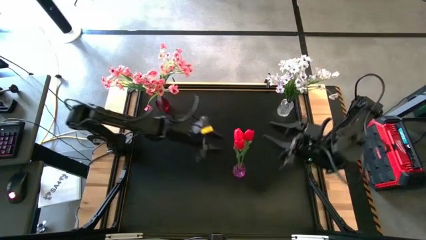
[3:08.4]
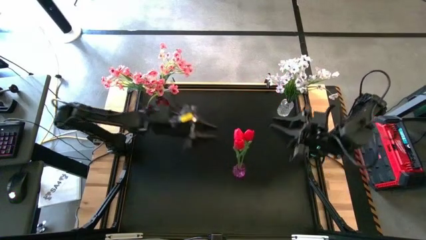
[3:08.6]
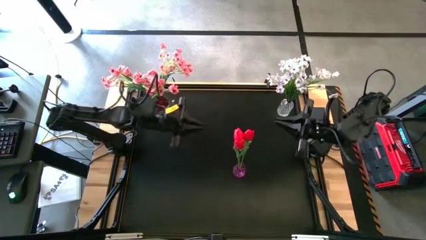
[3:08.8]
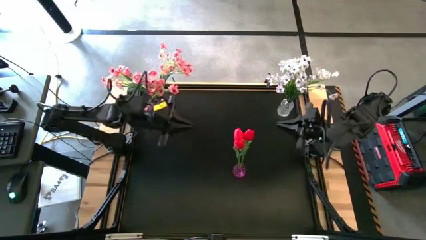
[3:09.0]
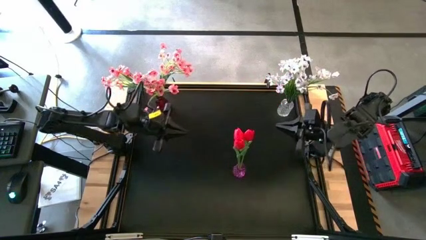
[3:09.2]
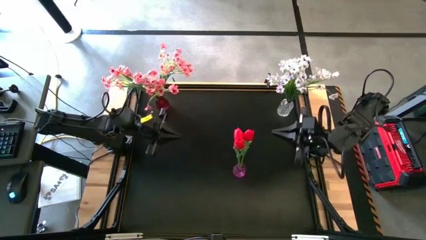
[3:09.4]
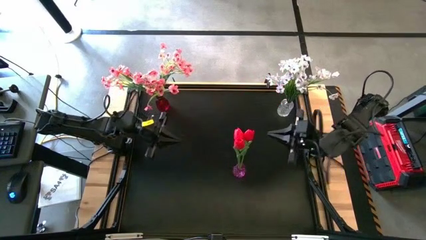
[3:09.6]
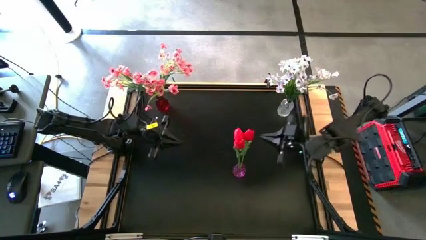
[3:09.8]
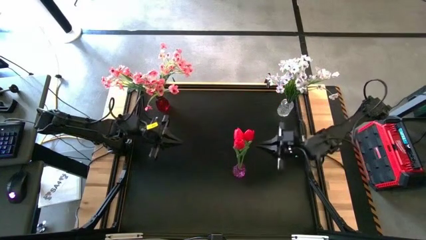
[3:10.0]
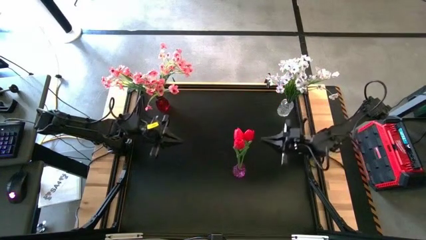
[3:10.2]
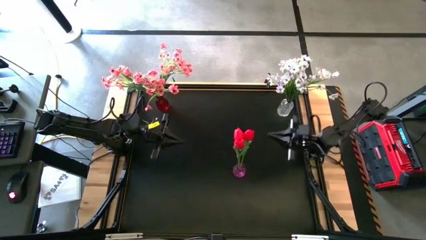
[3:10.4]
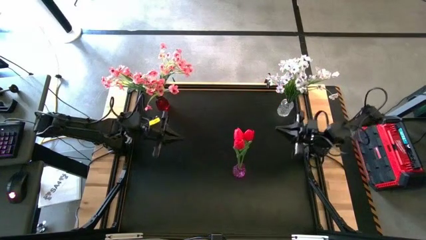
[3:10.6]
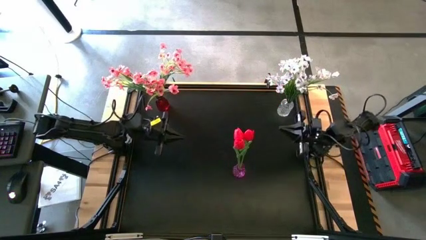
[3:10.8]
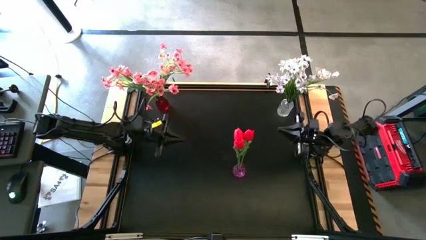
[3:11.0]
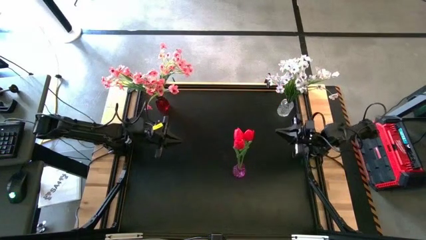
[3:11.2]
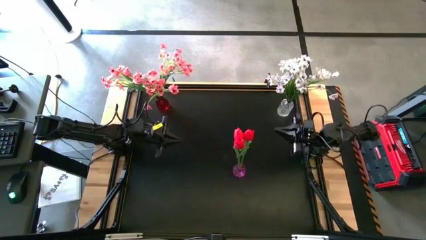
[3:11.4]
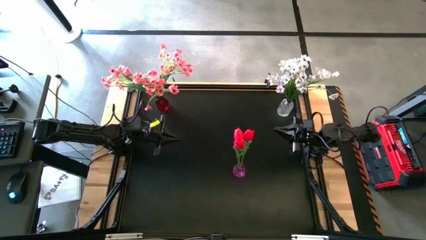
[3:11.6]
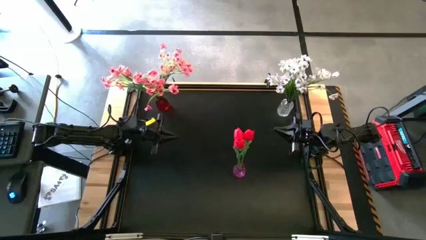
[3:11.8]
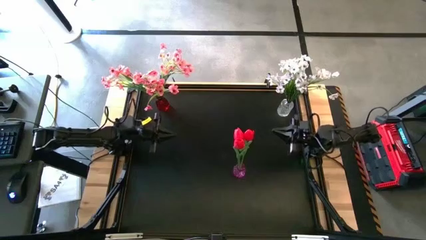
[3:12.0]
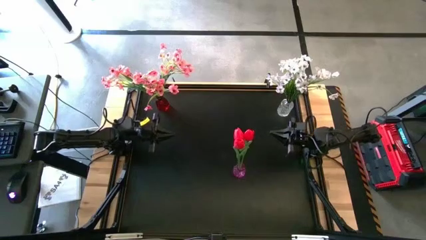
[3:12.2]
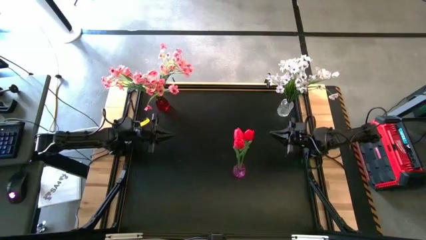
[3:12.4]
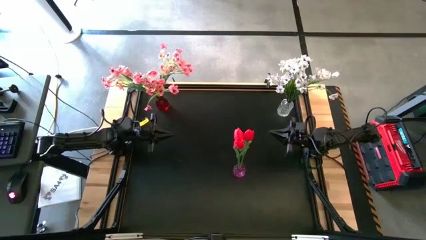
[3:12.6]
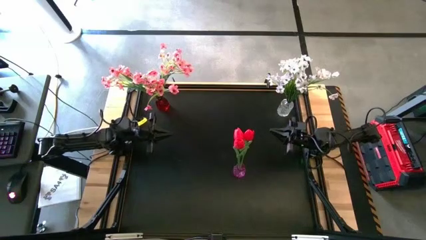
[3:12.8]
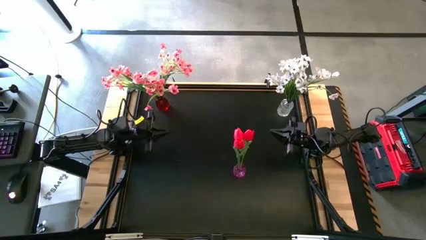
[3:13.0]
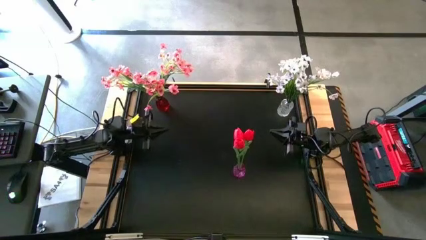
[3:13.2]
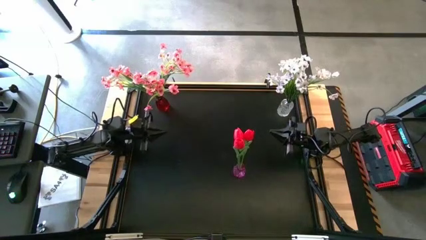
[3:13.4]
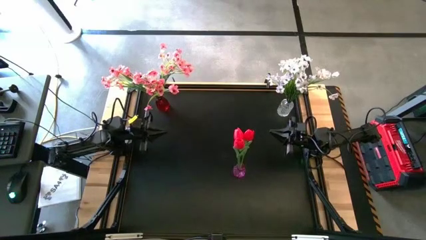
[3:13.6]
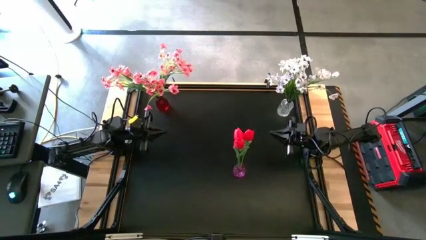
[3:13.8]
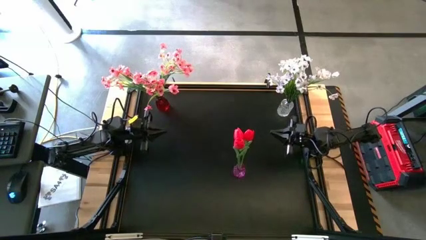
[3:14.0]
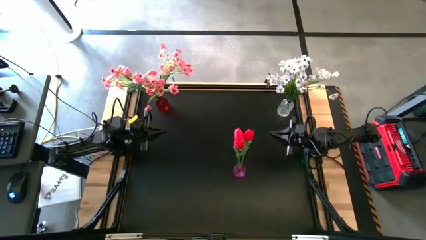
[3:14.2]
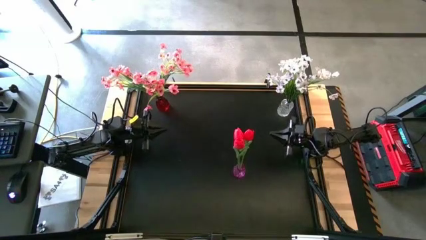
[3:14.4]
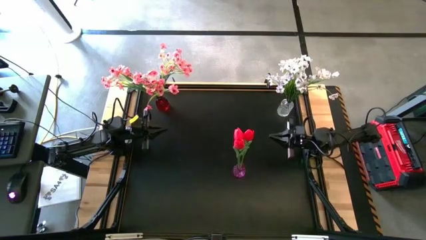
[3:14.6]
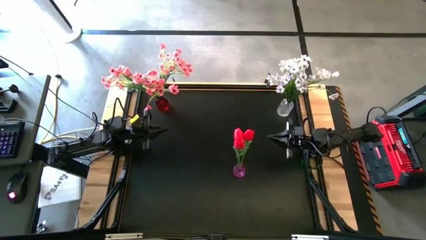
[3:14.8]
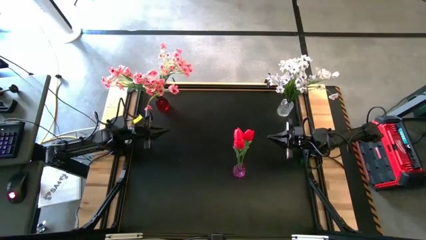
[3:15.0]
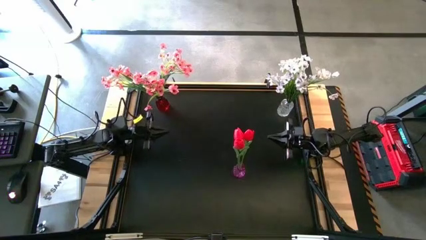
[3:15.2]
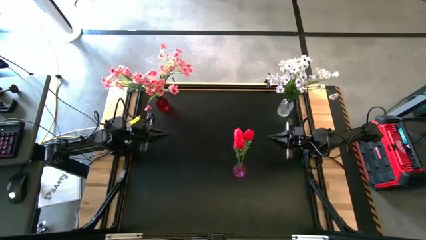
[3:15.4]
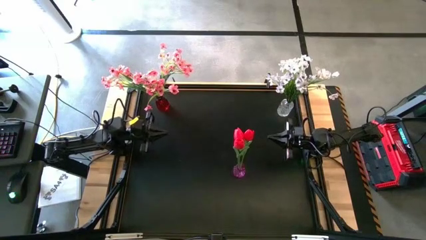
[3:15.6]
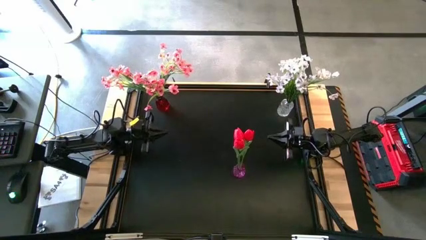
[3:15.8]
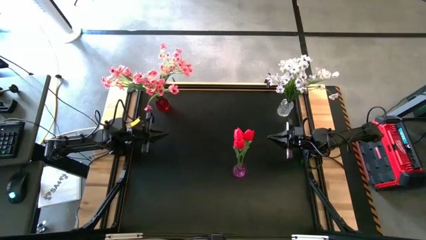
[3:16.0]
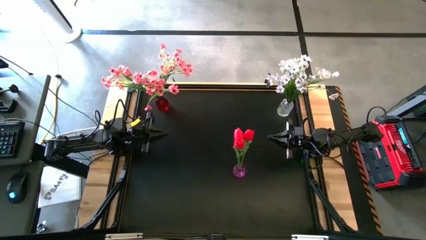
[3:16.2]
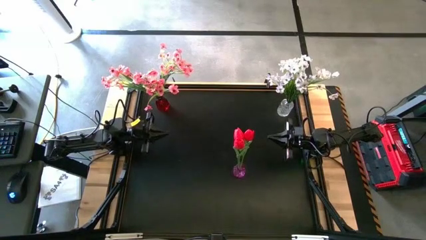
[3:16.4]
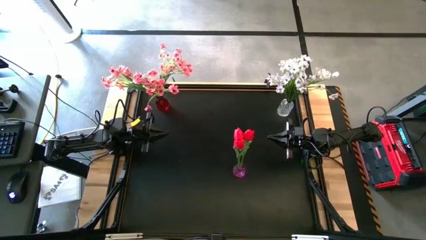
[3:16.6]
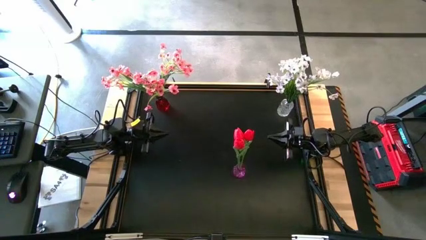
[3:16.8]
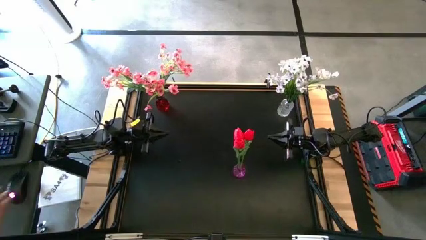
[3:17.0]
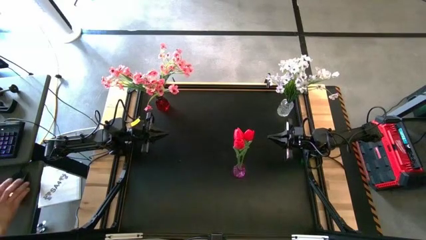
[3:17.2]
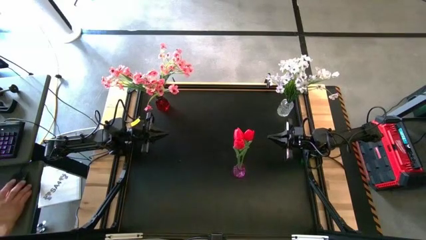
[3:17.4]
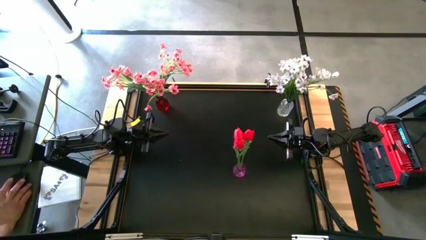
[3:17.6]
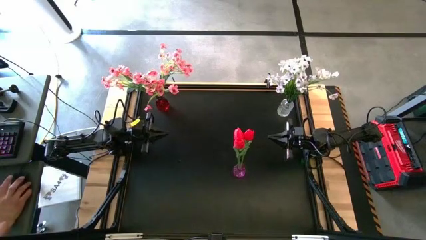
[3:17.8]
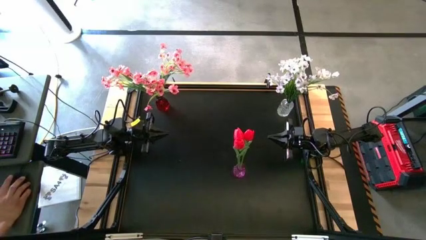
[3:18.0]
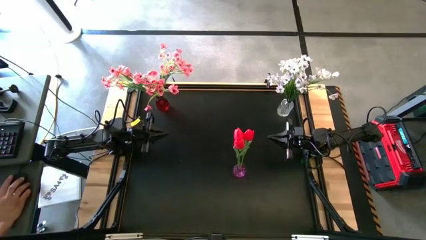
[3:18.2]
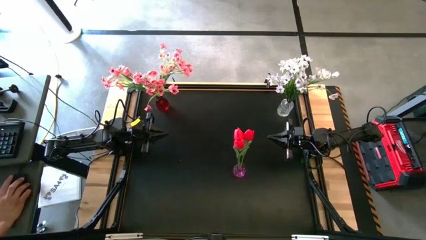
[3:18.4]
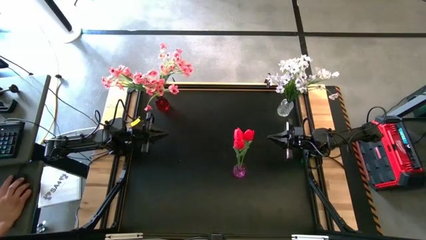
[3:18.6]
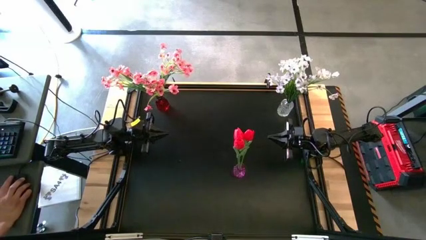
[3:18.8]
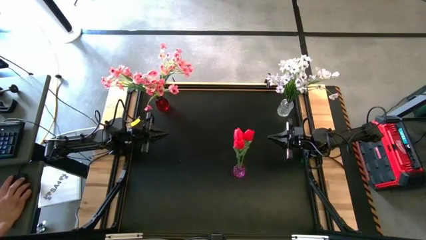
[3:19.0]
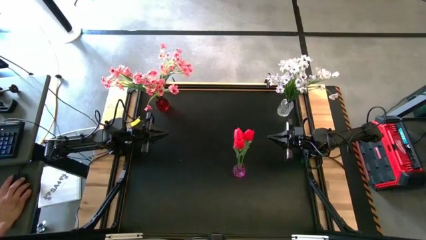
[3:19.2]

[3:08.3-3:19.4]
Task: Sort flowers into vase by color
Return to Home Position

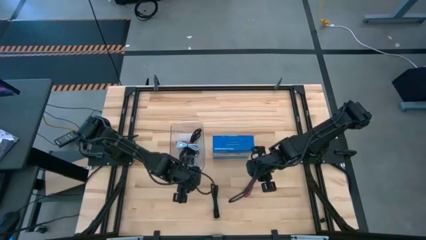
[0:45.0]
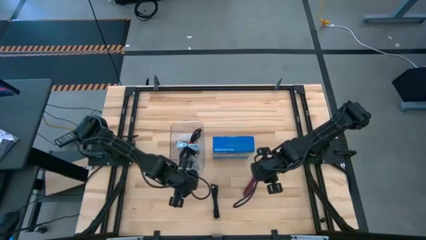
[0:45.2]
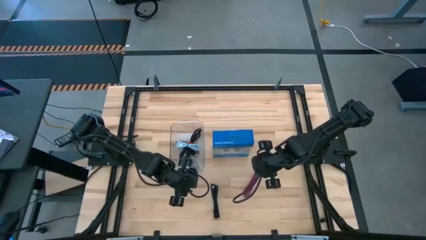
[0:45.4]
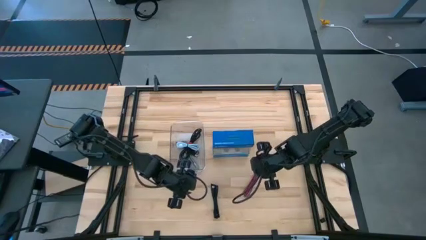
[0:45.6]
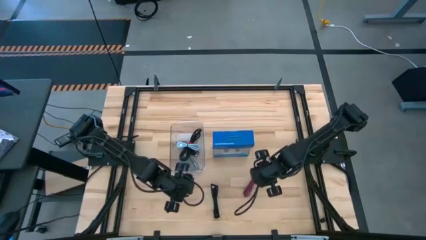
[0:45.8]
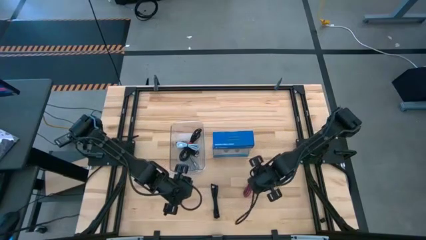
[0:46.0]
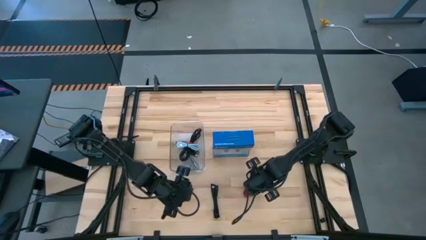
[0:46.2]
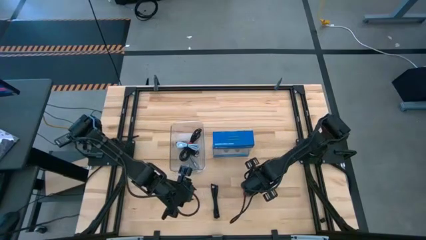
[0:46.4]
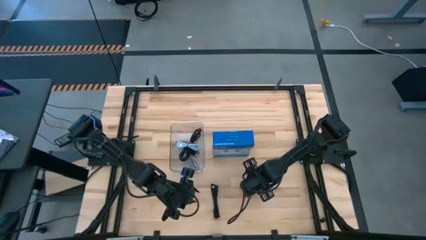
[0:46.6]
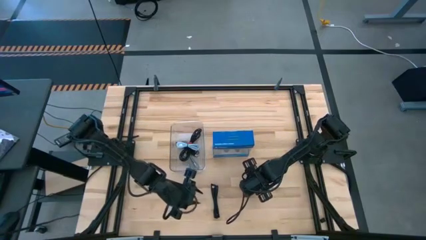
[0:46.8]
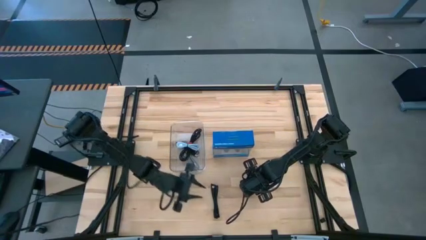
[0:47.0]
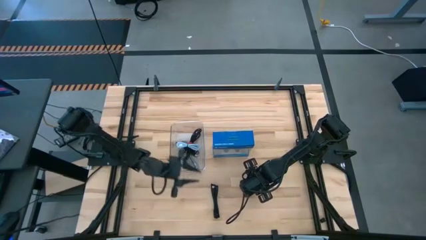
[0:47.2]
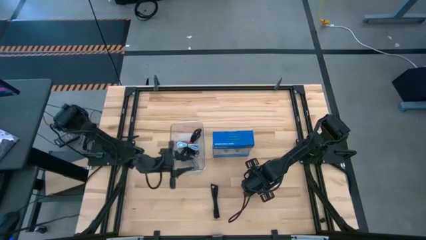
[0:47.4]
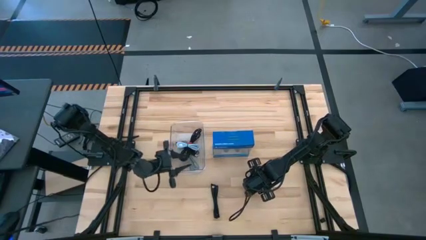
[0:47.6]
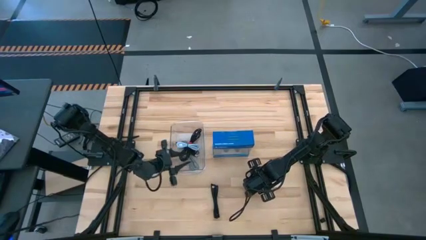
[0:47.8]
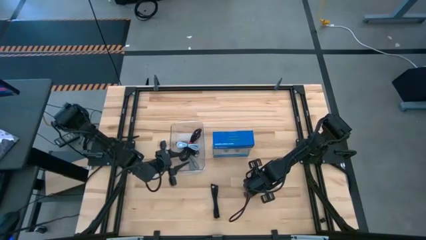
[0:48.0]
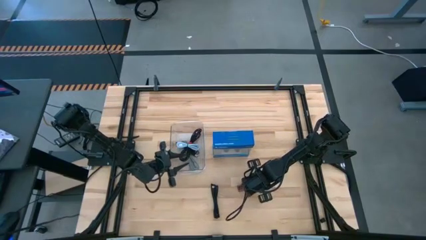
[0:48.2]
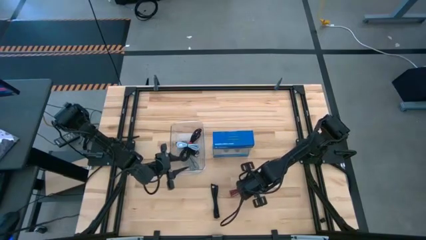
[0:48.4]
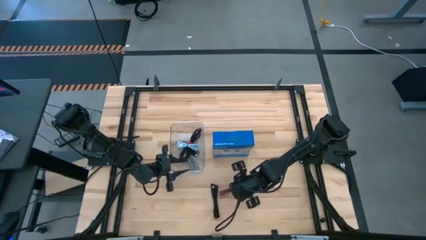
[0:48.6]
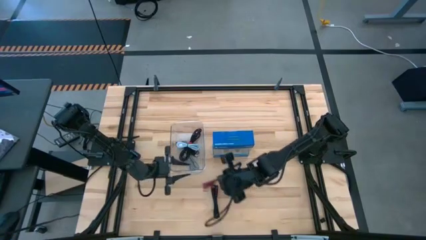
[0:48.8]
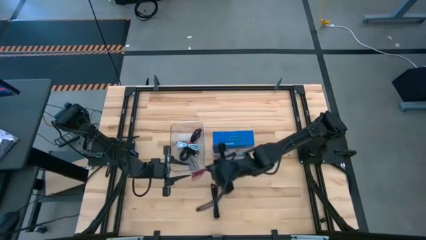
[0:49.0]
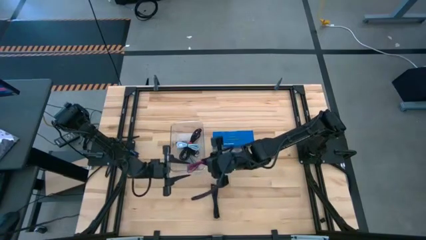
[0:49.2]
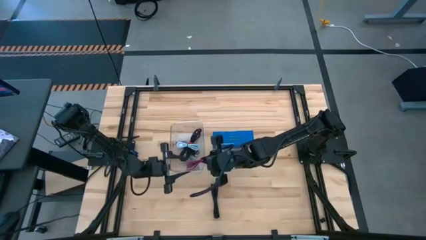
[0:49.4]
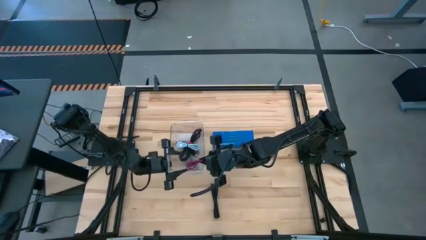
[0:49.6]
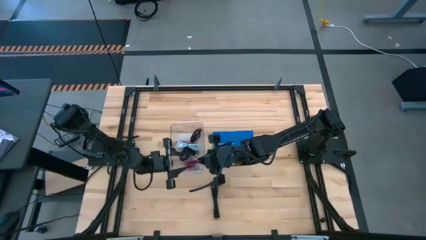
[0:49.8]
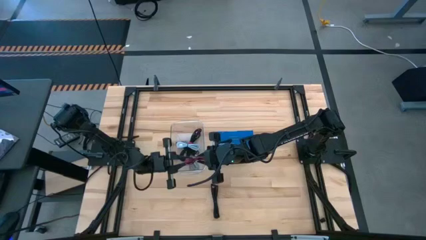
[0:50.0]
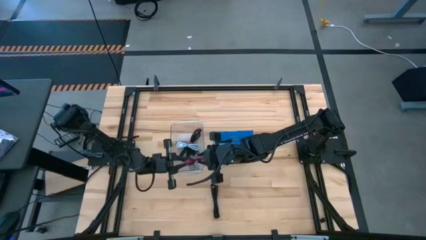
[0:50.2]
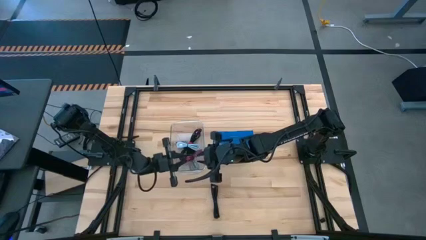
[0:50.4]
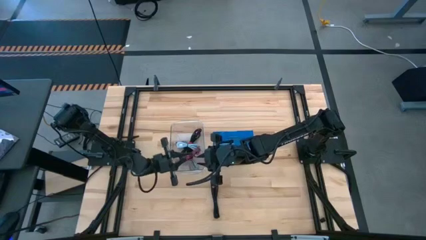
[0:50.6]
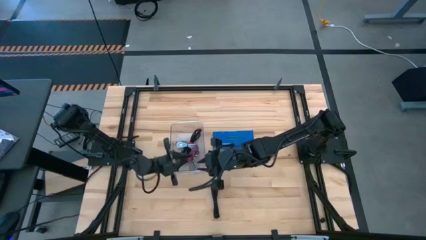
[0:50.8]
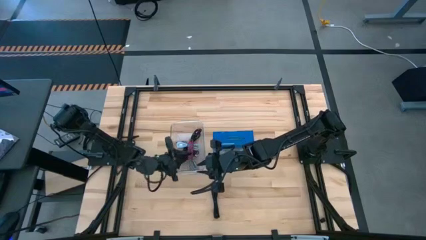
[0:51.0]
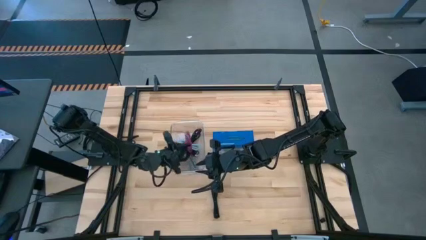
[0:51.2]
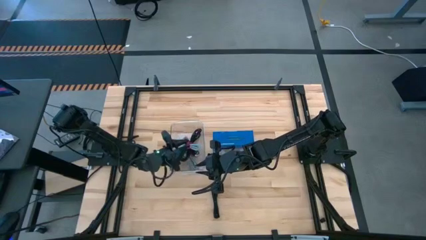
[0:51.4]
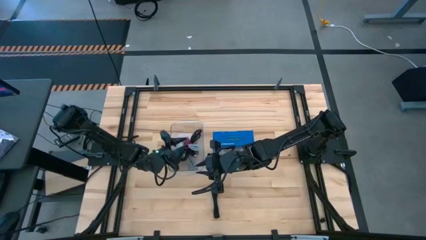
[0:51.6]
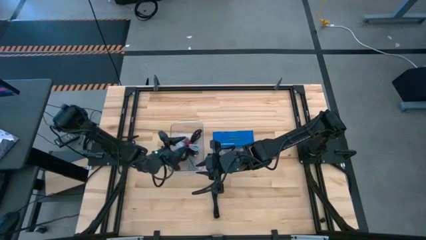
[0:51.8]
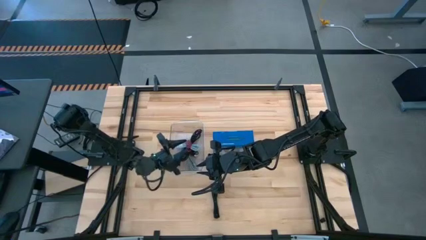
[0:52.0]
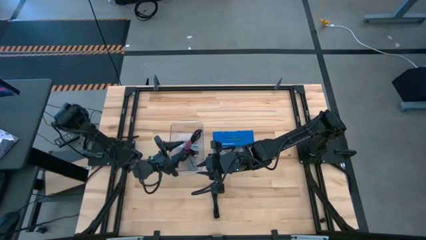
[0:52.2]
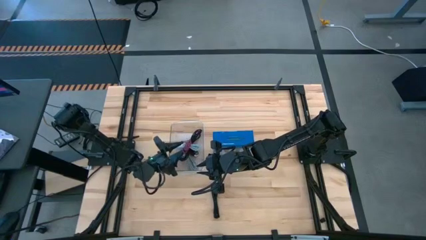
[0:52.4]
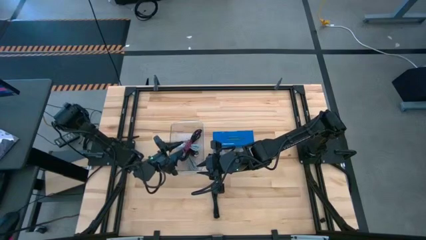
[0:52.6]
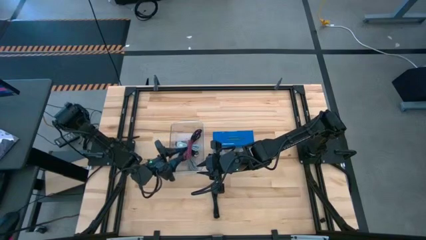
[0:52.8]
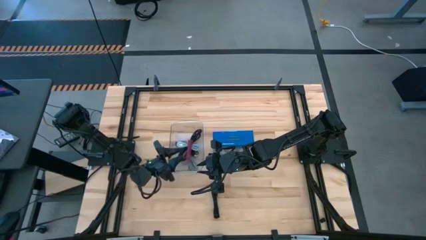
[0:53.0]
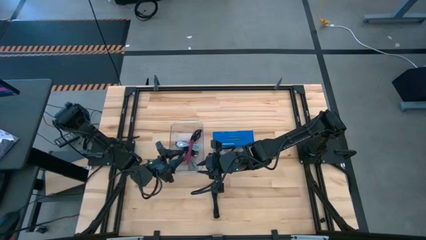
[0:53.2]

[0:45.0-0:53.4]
Task: Pick and place USB-C Cables
Put the pink charger cable into the transparent bin
